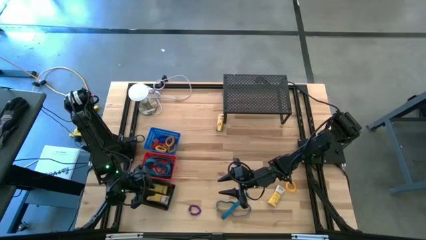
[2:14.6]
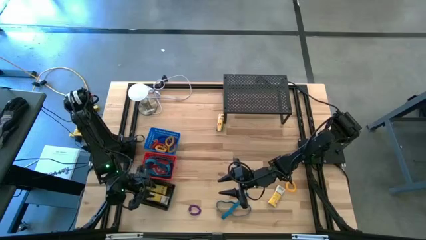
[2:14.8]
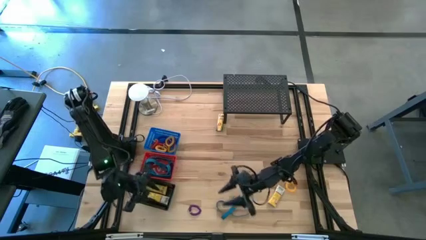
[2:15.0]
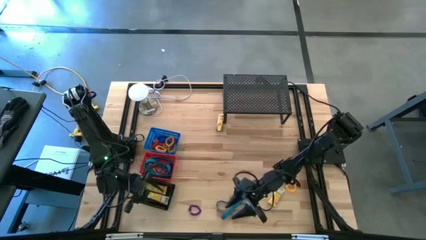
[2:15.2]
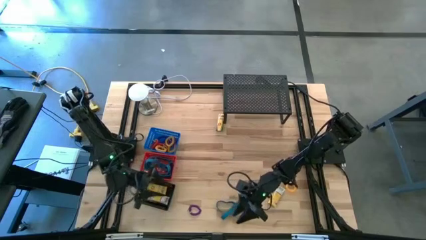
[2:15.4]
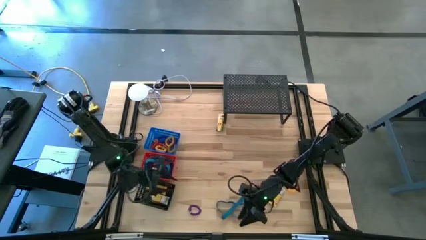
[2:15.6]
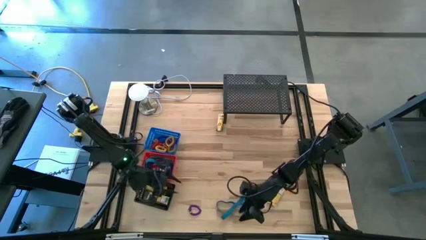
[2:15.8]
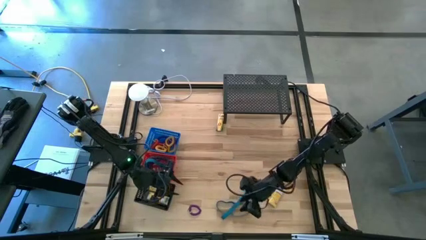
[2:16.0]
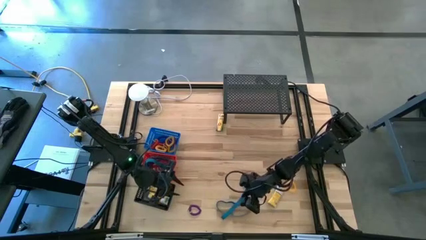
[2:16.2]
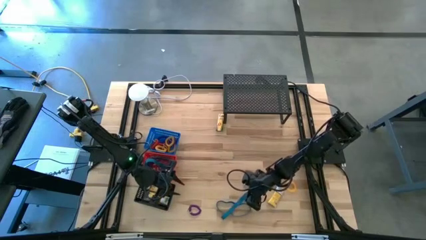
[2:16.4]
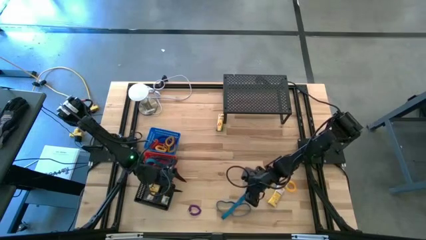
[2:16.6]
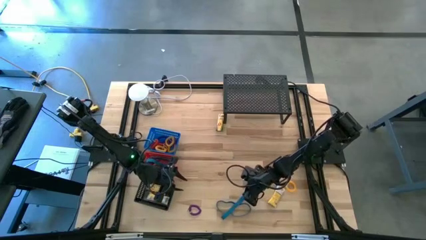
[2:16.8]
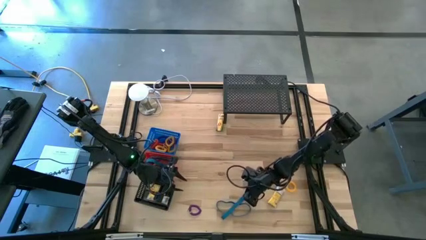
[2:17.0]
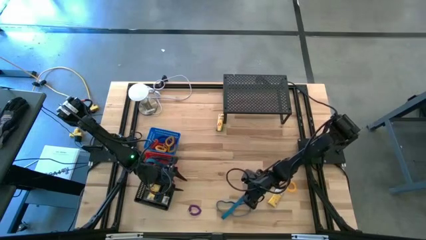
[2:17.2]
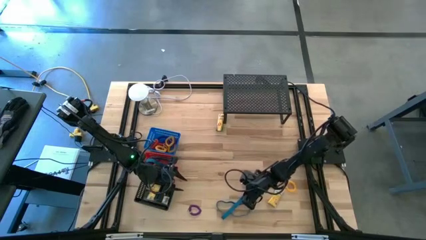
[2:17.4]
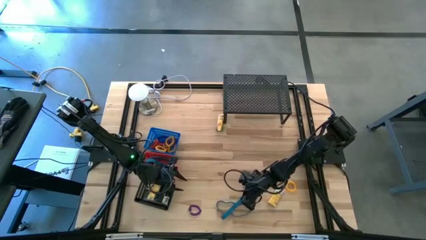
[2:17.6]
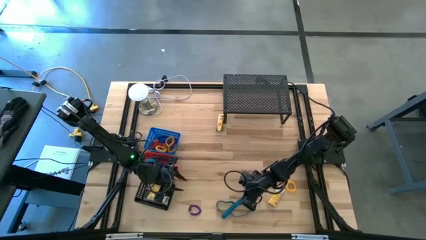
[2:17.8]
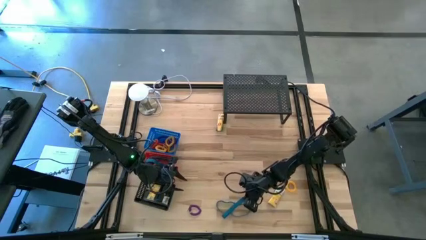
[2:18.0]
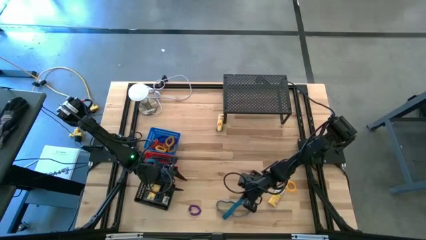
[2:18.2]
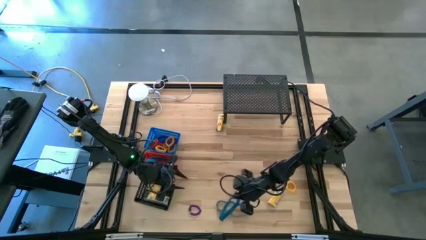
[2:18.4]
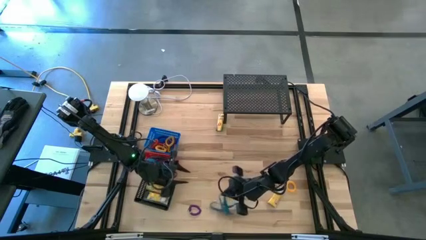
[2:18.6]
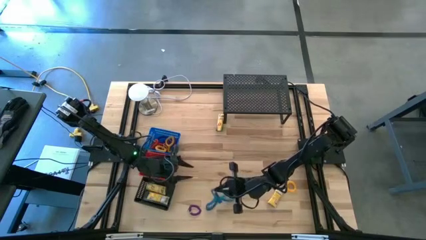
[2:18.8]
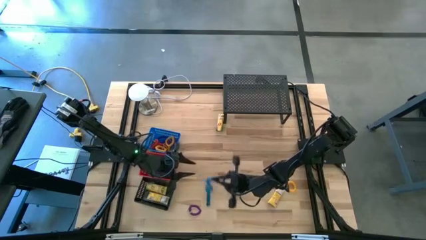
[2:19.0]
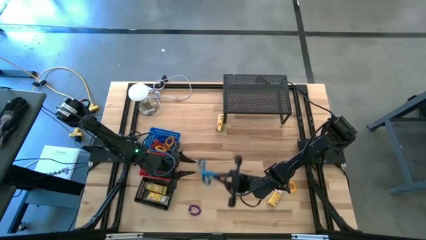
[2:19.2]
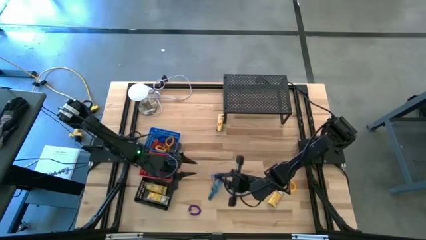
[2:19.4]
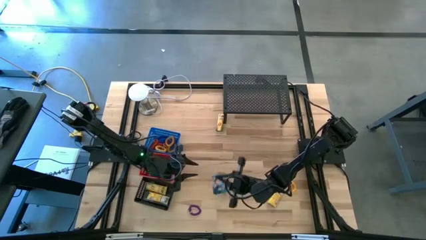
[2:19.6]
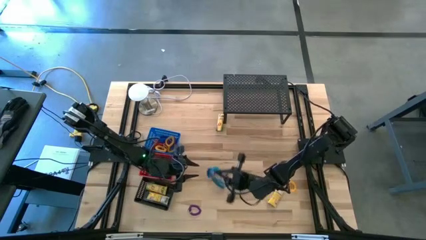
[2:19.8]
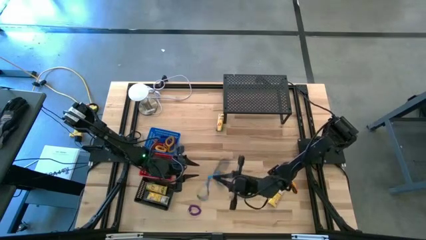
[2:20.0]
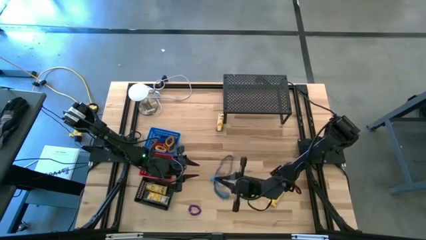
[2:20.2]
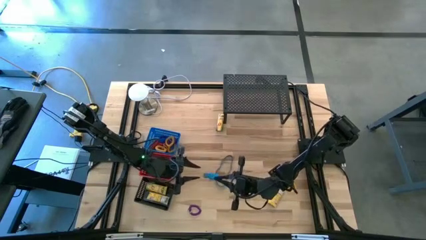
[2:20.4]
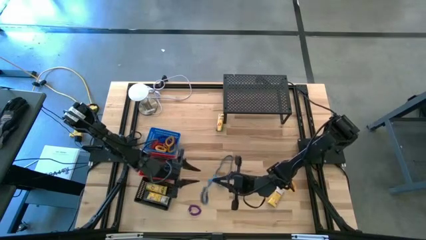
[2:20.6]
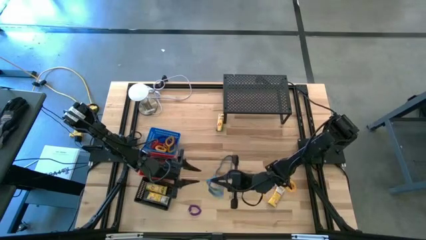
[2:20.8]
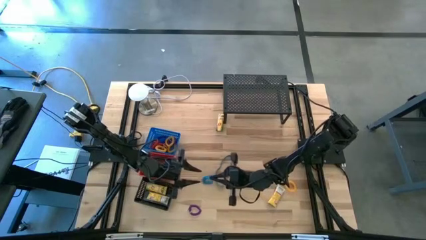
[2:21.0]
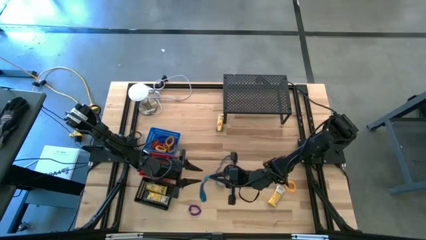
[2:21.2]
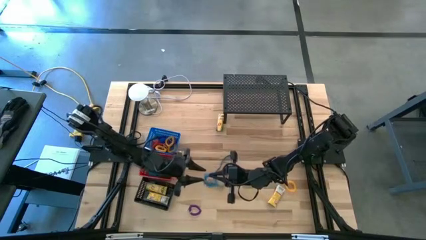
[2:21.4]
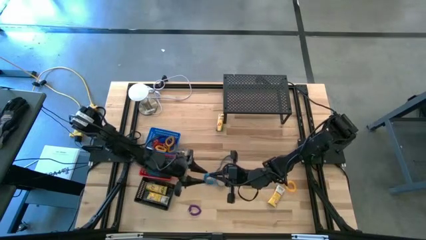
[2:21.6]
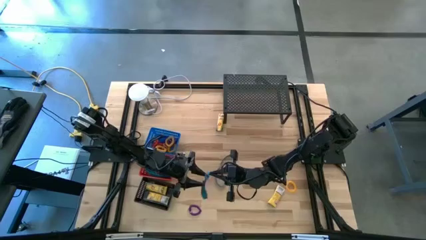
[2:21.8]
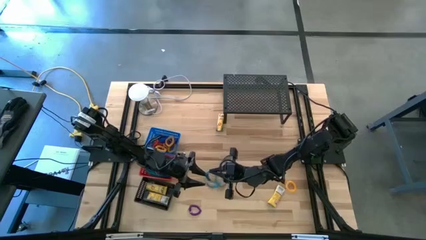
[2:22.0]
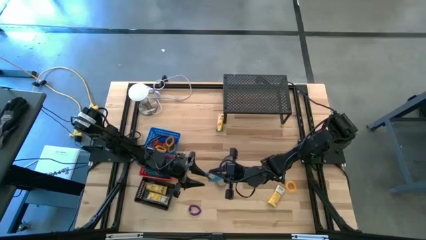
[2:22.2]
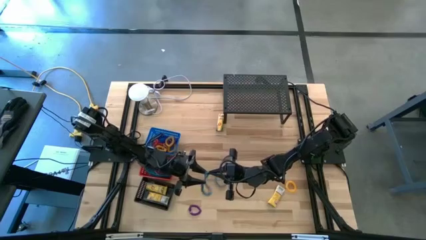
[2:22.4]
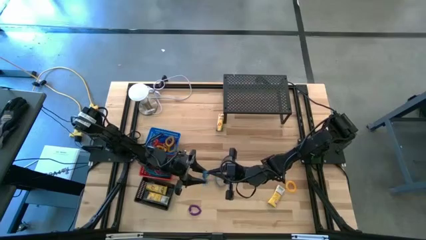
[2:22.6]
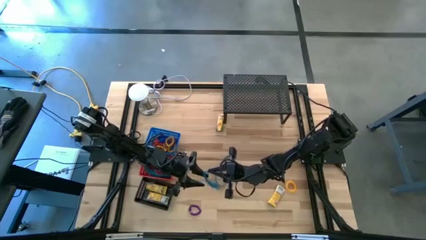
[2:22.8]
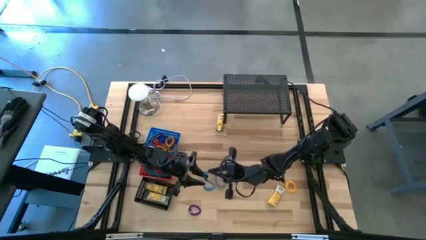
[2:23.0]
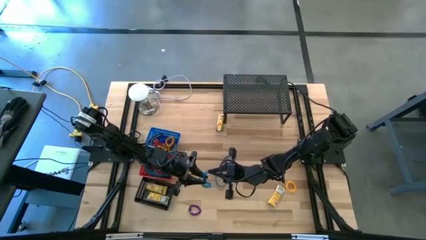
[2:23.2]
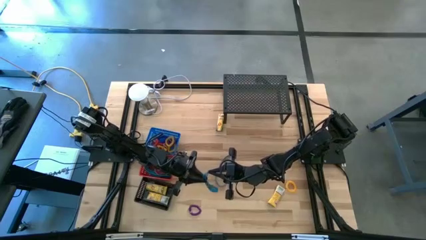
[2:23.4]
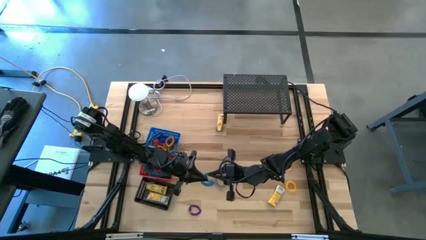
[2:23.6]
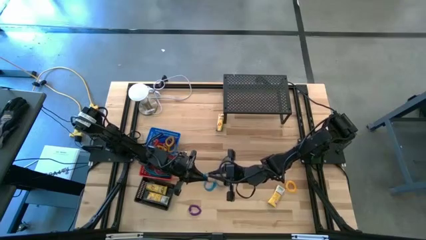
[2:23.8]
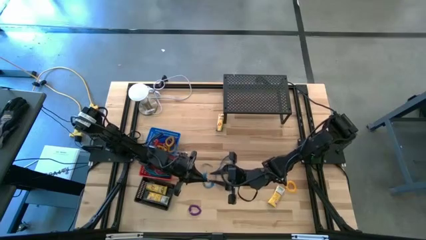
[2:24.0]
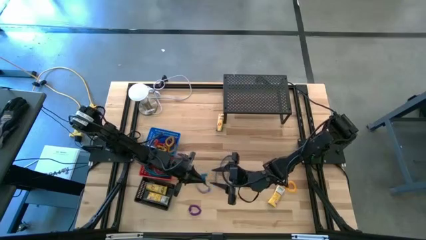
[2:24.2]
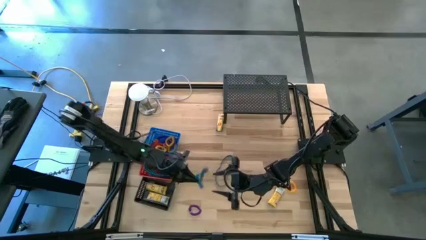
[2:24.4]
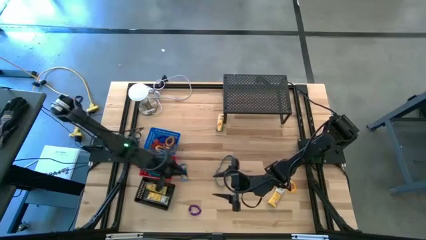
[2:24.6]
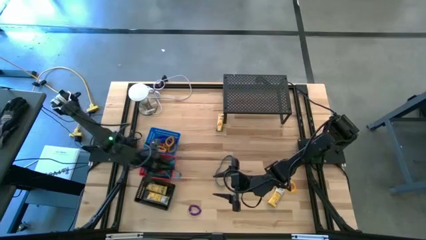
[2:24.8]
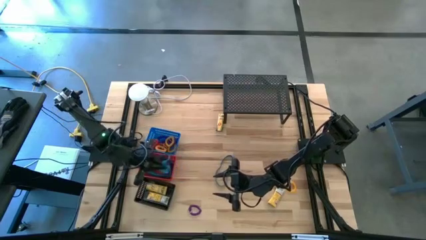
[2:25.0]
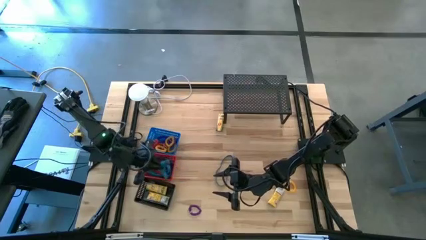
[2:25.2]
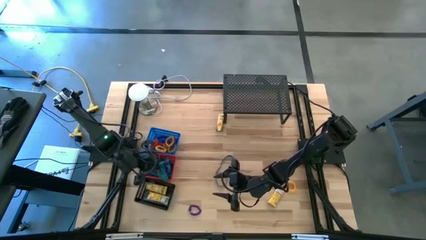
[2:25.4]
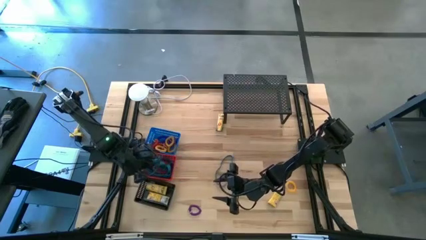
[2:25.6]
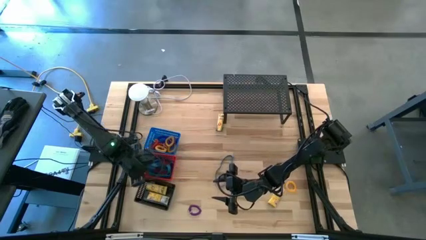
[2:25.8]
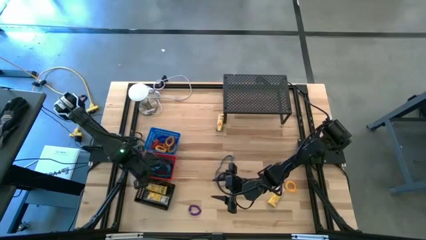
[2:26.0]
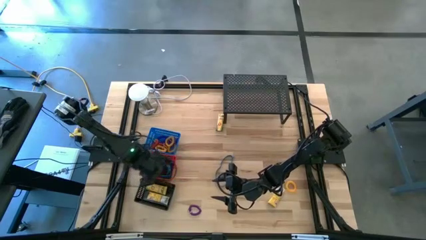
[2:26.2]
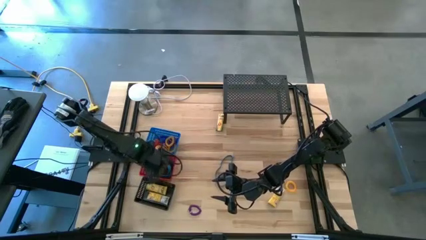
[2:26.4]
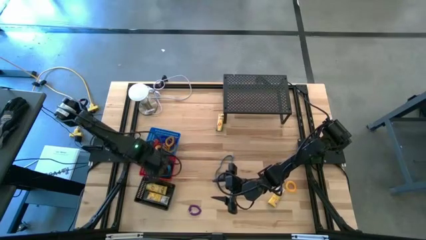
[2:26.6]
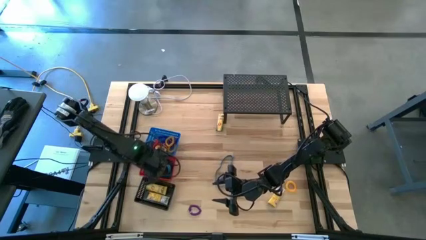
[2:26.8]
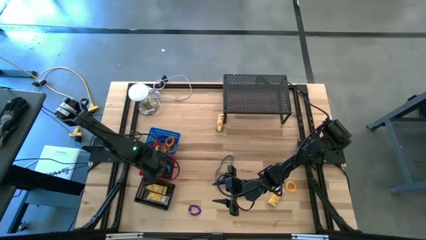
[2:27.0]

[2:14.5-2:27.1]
Task: Pick & Place Office Desk Supplies
Put the blue rubber band into the red bin

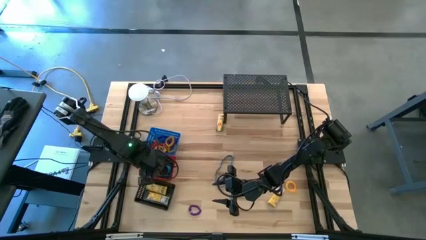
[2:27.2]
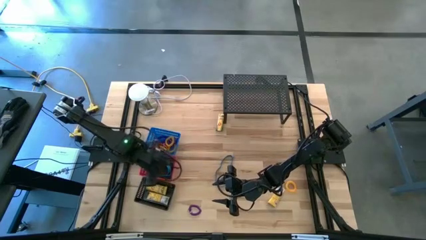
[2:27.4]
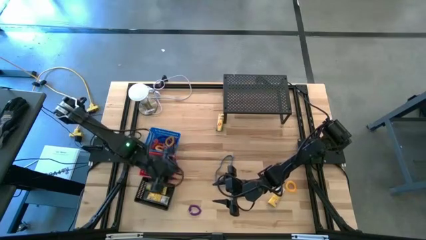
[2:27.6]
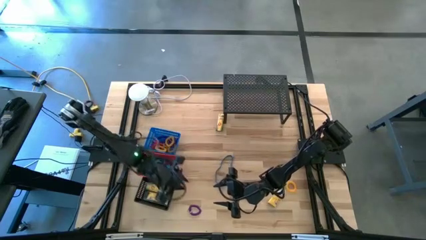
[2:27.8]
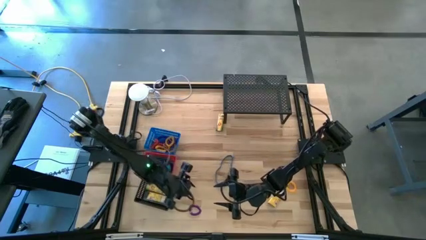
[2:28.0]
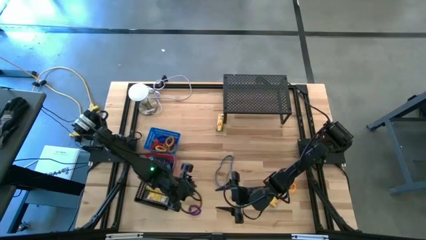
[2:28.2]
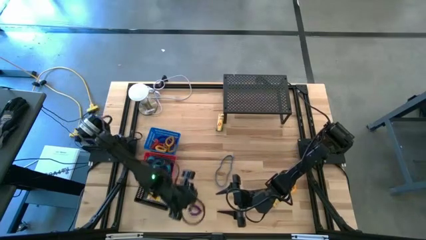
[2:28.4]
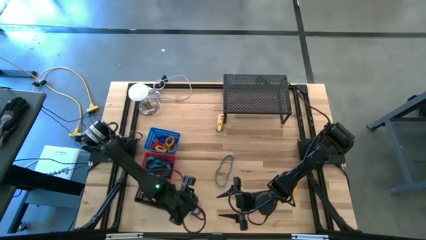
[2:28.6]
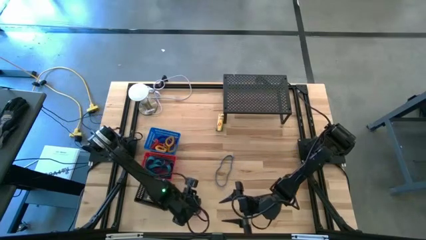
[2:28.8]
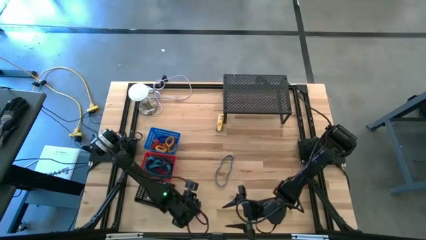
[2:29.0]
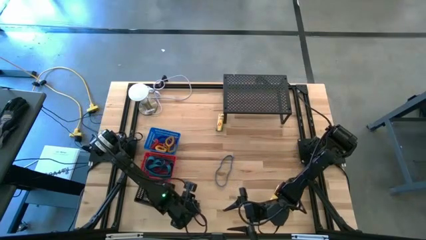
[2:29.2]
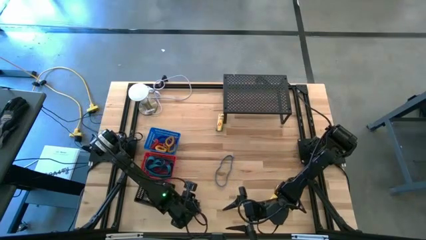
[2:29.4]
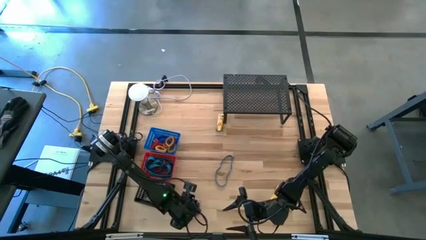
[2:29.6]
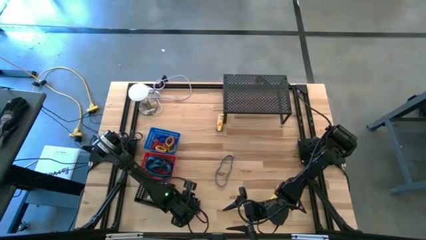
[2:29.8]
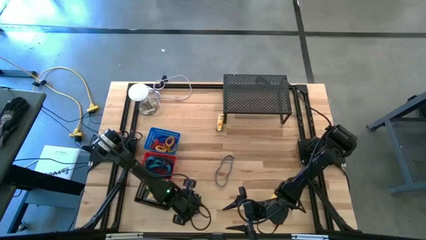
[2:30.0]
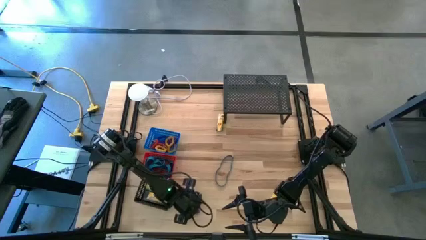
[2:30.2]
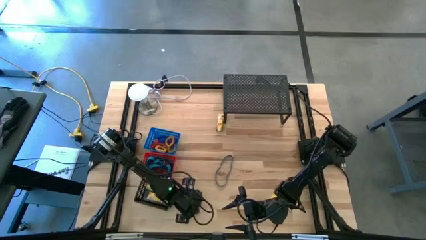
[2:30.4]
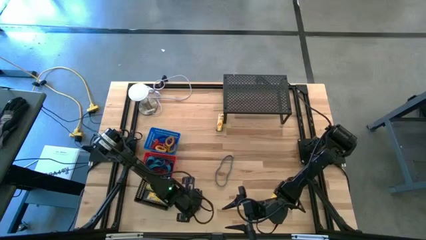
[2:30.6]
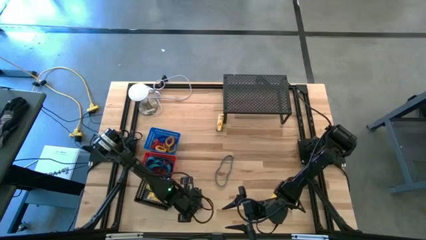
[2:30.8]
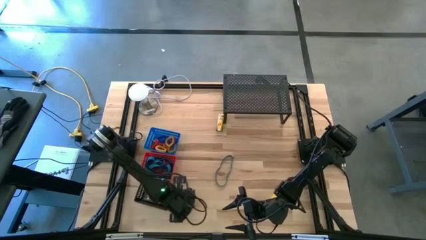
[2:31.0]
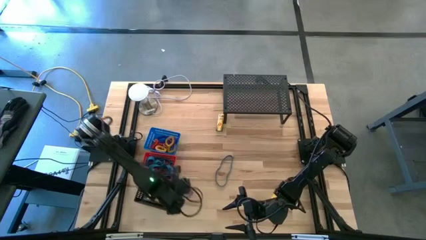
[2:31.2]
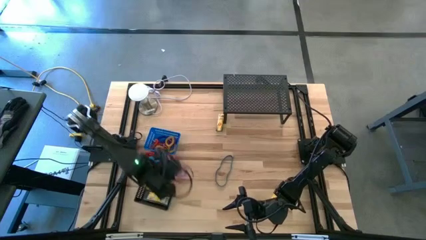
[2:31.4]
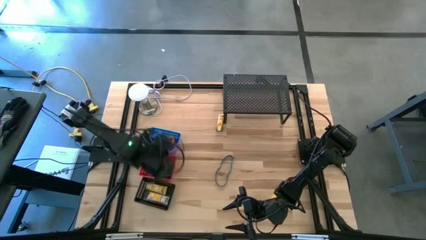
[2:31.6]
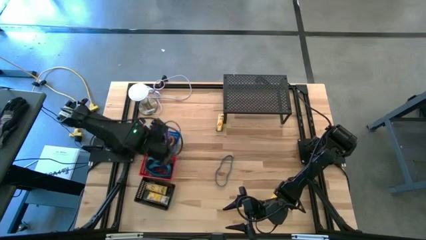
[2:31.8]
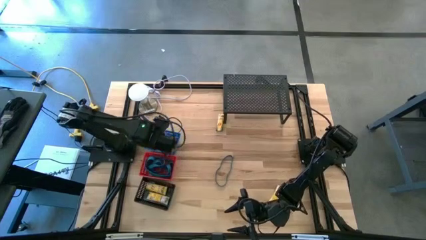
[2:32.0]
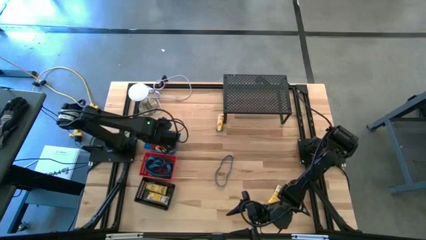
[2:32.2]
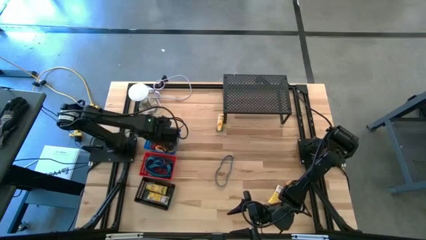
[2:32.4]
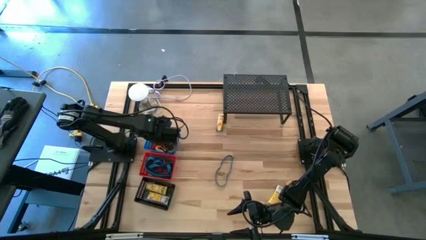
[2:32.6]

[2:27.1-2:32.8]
Put the purple spring keychain into the blue bin
